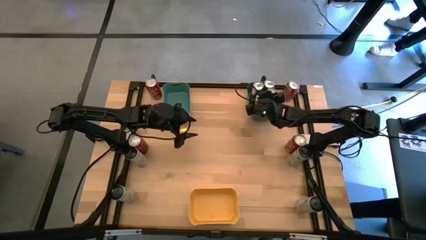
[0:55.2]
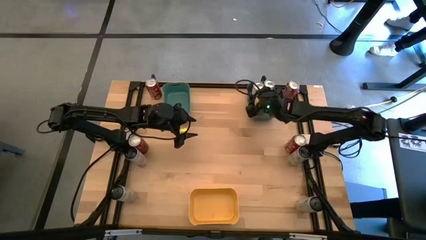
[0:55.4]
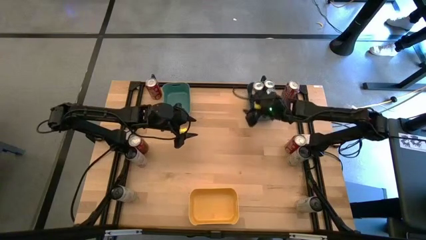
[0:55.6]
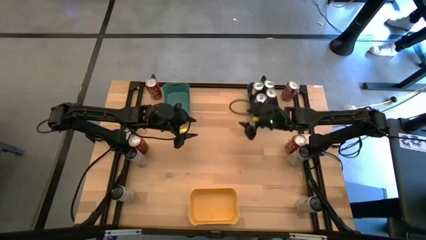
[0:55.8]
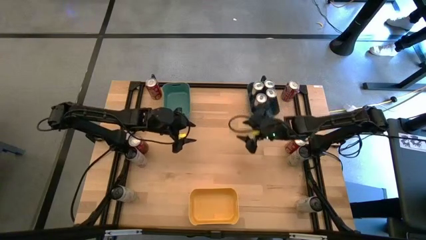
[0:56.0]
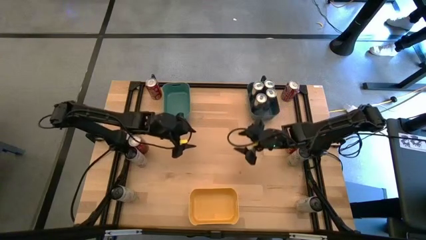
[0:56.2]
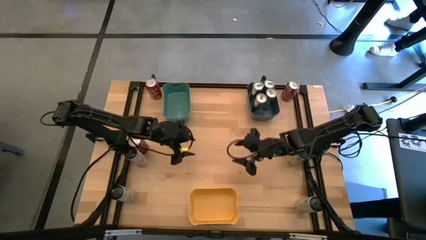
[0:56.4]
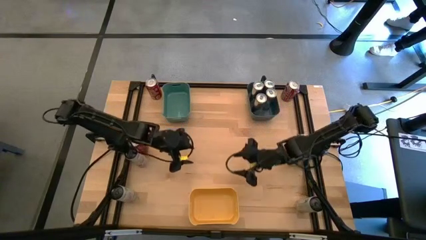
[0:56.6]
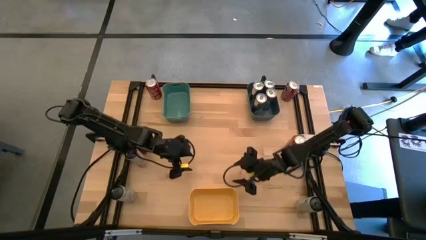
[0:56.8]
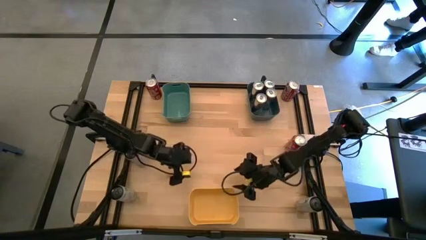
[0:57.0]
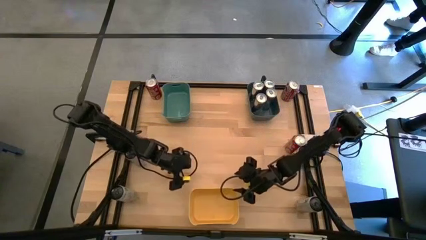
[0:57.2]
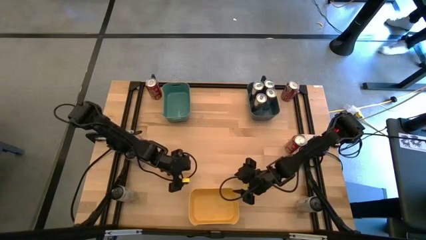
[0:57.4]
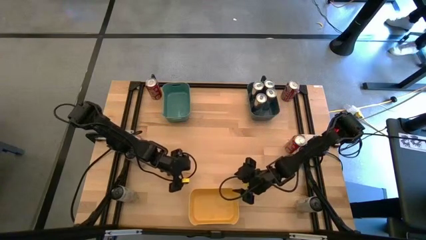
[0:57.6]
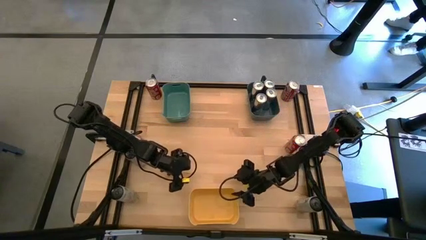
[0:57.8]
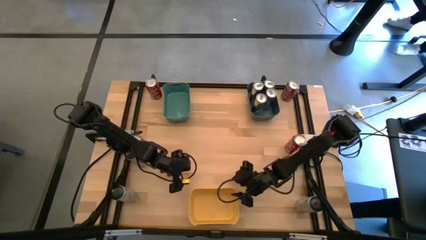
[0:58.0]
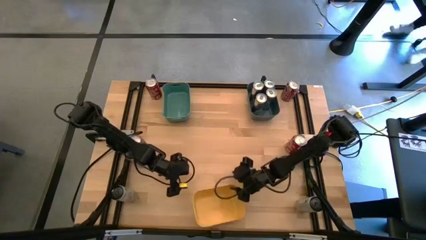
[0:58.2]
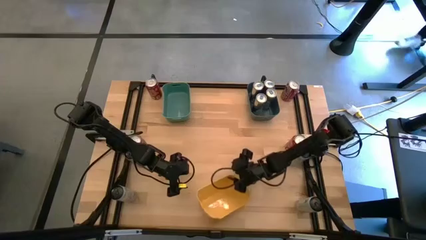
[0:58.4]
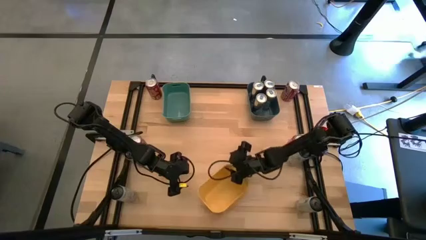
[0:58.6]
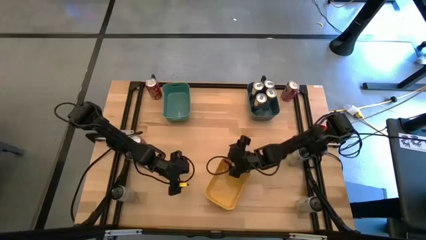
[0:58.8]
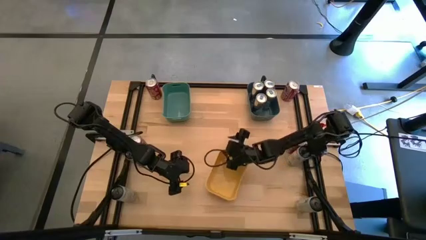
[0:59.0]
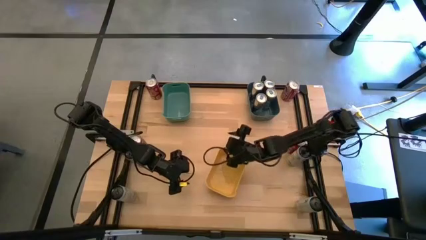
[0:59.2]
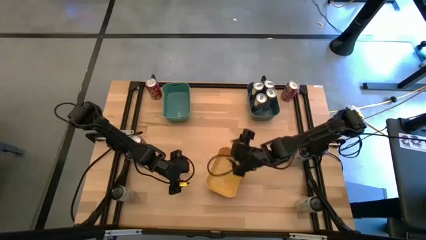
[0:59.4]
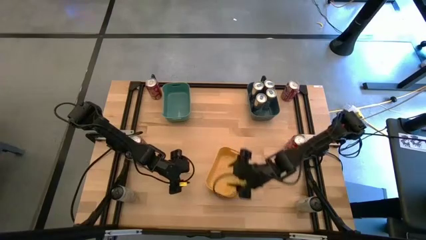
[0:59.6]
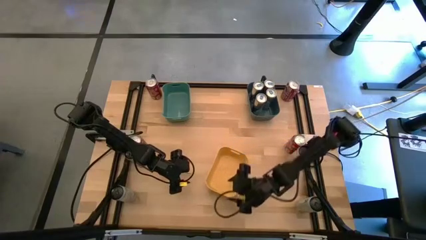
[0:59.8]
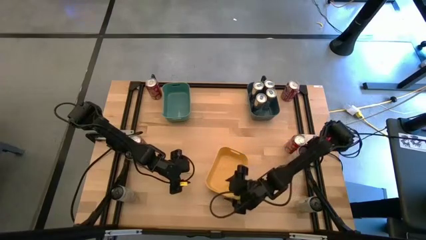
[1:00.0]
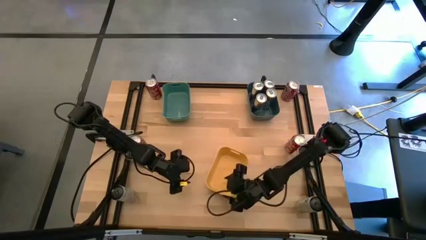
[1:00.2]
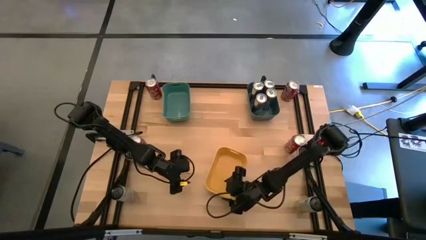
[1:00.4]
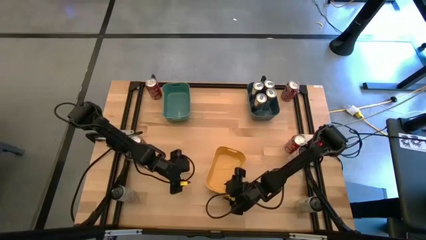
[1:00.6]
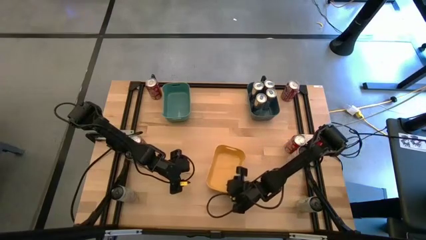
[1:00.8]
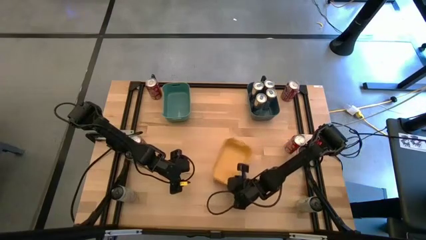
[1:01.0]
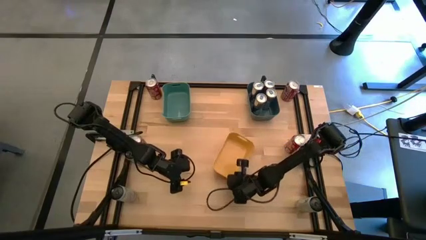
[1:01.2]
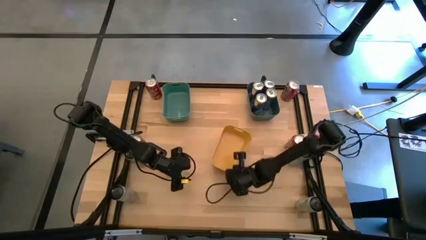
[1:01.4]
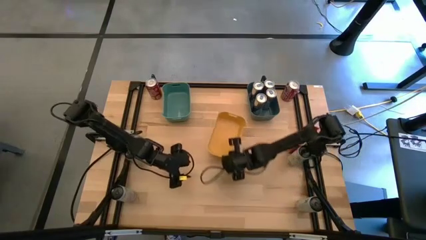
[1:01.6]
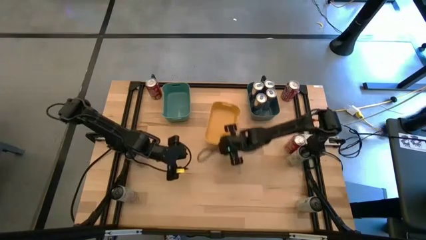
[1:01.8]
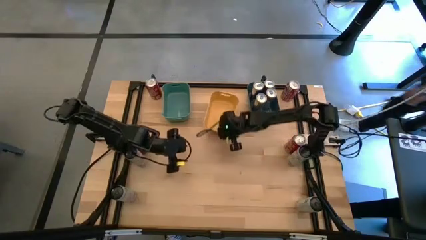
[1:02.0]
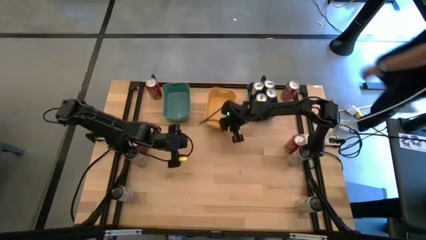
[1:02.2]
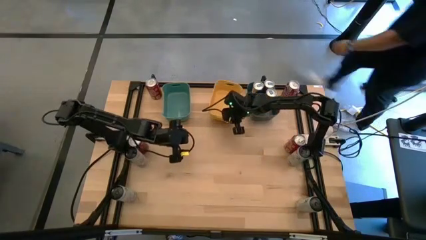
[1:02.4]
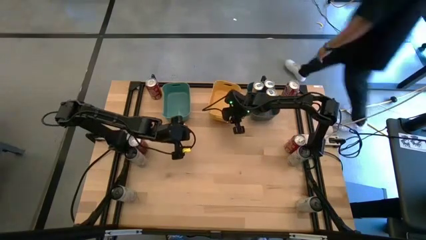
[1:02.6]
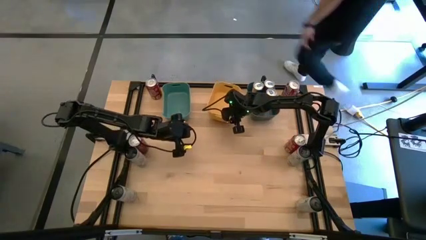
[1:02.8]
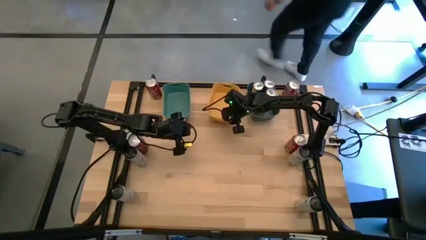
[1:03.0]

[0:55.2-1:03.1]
Task: Sort soda cans
Move the yellow bin to the top center of the table

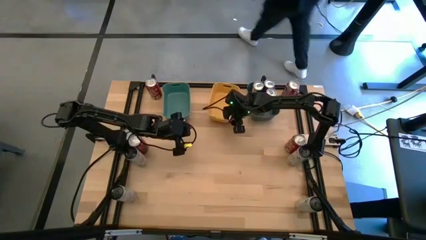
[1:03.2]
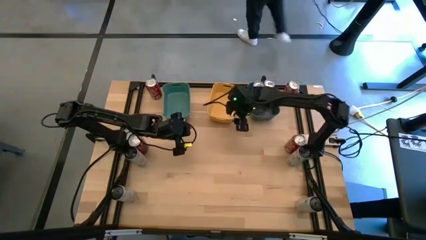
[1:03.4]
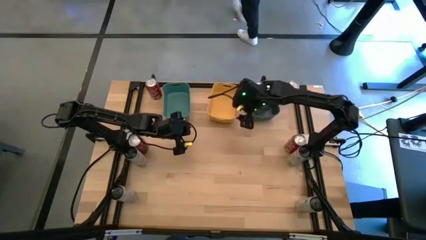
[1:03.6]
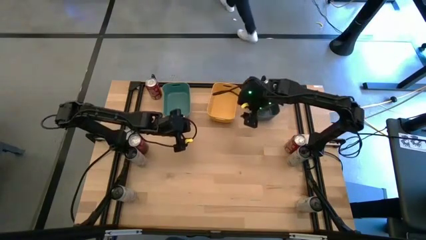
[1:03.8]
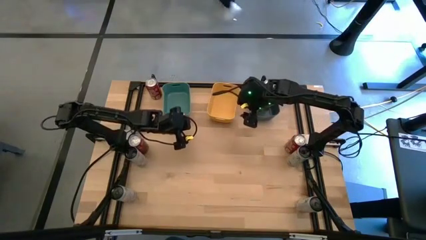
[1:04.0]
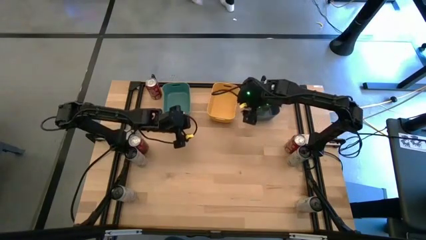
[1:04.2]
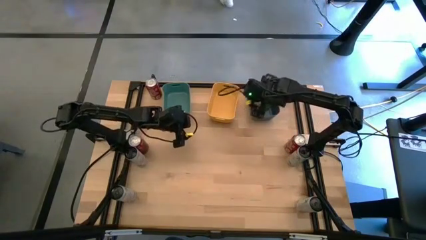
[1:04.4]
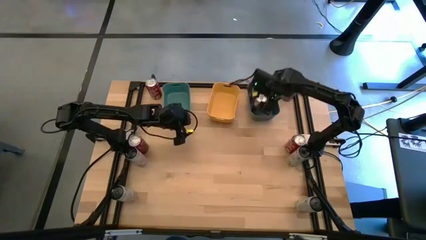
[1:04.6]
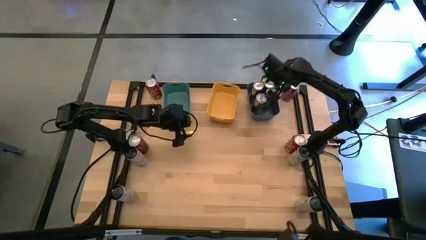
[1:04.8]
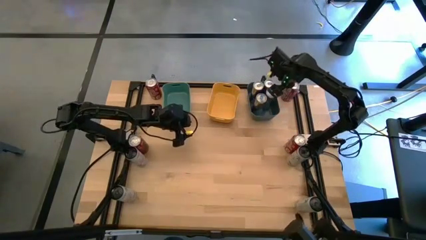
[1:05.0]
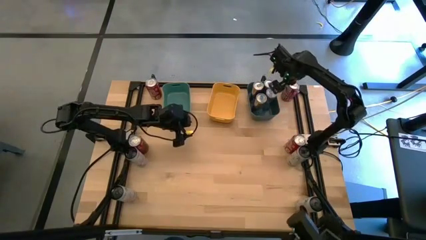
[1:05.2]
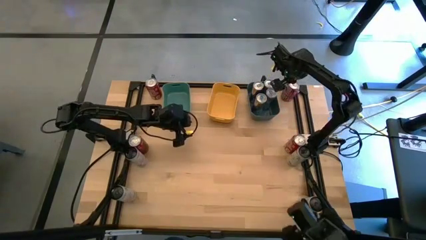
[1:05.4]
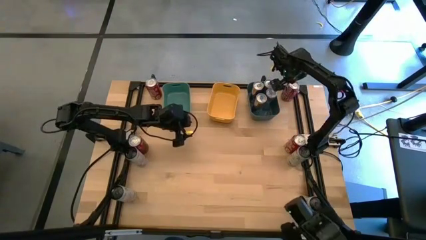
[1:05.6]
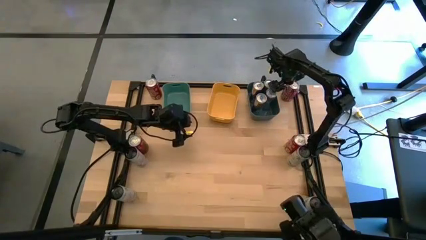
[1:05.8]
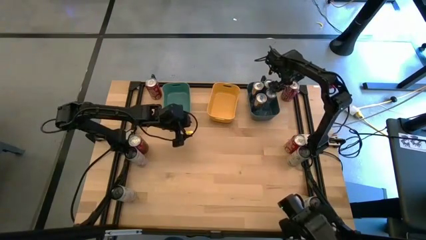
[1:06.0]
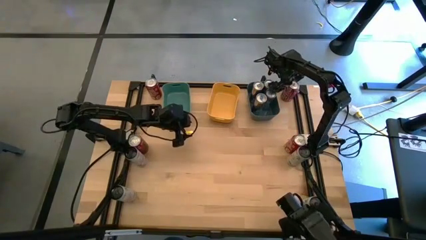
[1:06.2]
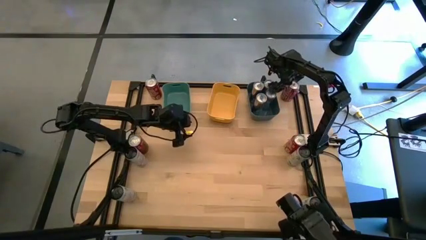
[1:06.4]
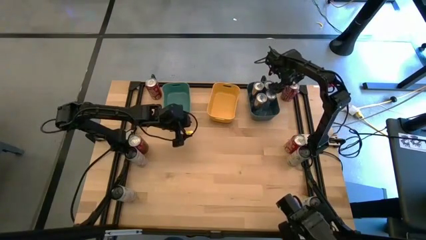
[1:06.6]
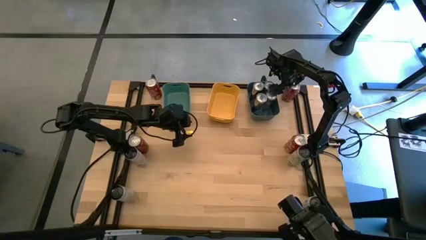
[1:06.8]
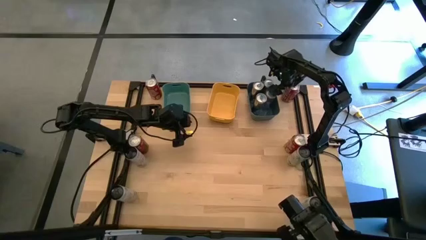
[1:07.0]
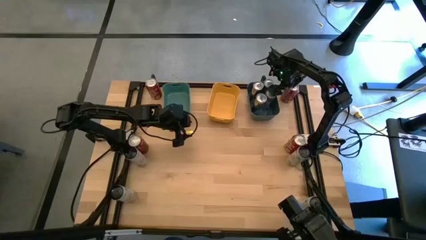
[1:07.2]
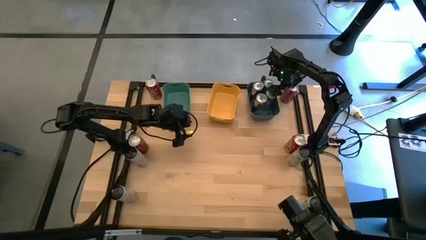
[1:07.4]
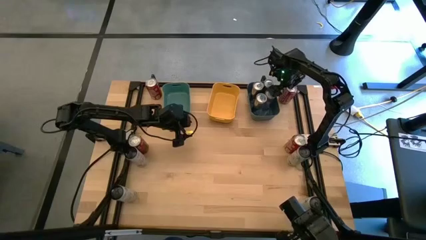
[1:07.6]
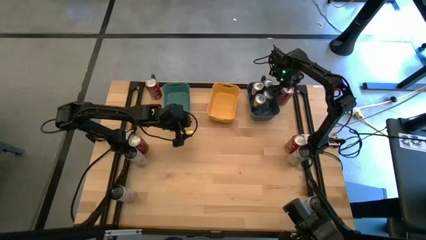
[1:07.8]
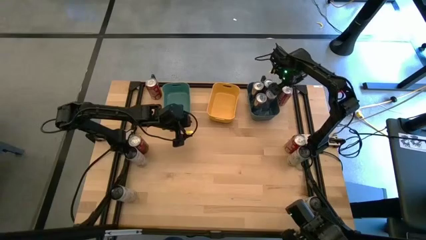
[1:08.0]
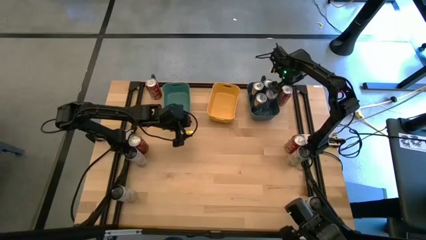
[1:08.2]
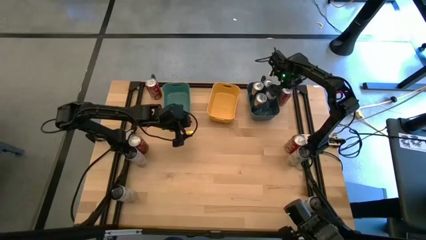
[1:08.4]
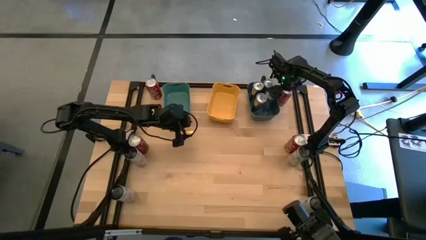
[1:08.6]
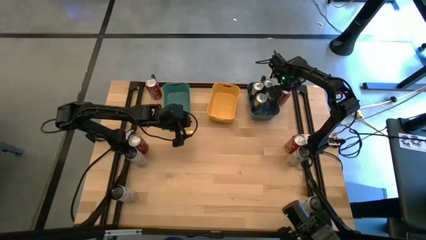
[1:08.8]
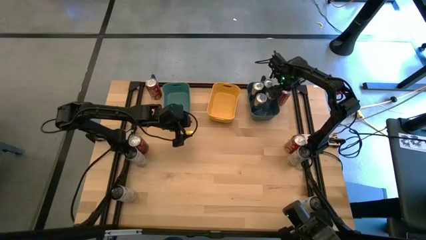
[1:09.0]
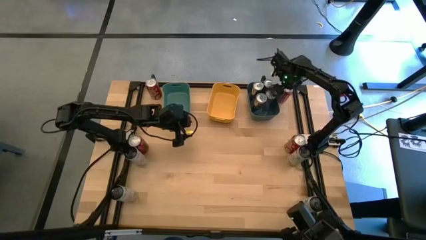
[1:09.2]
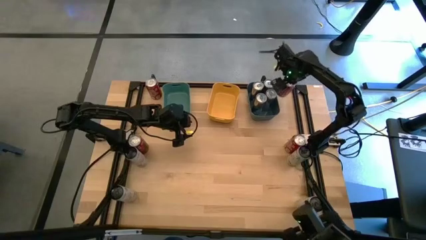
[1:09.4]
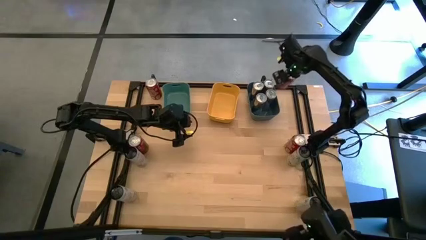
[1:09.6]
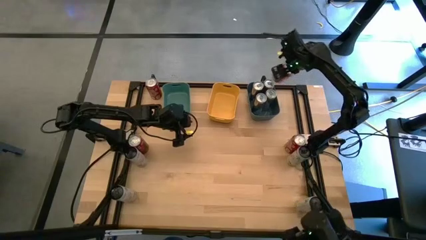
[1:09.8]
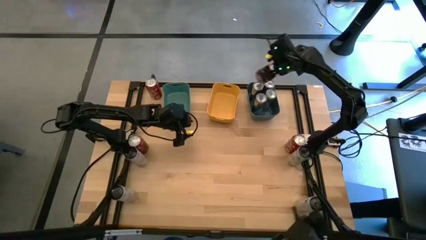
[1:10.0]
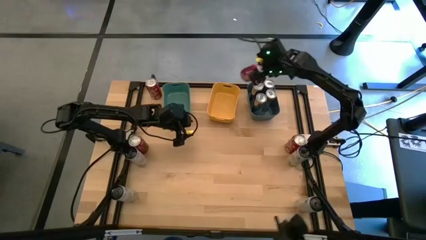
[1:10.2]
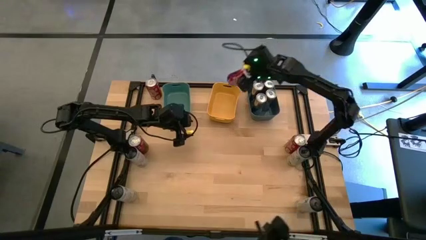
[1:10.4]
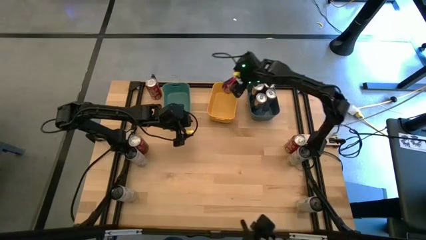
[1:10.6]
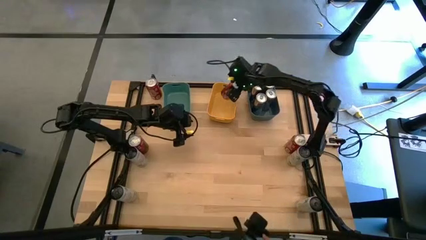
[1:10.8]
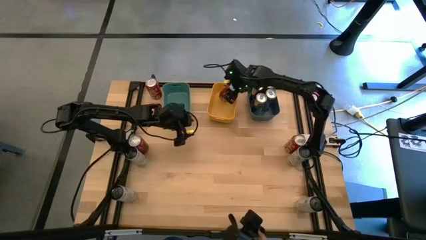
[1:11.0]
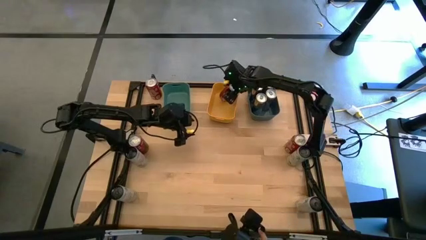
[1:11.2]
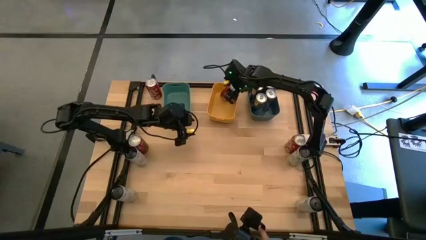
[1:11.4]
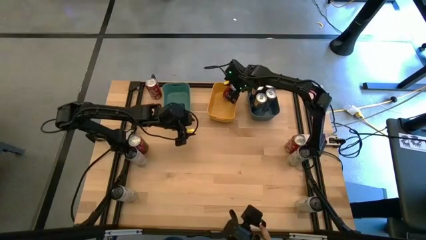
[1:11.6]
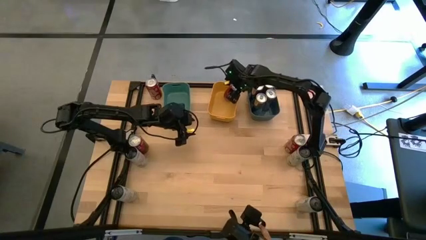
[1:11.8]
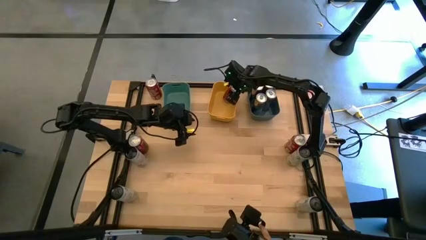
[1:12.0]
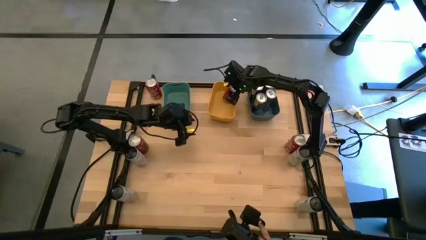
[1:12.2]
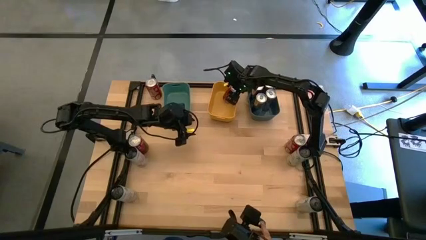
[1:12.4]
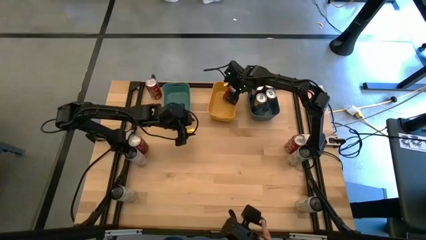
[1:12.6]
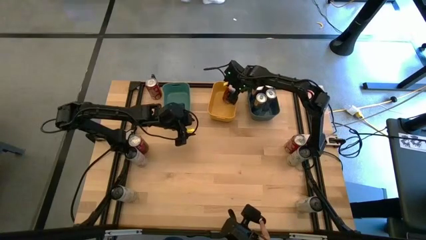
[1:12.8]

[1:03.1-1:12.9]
Put the top right red can into the yellow bin
